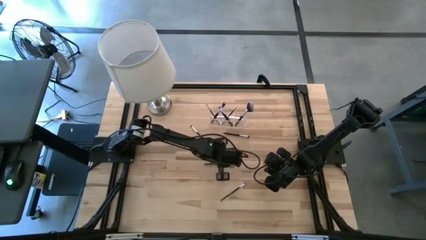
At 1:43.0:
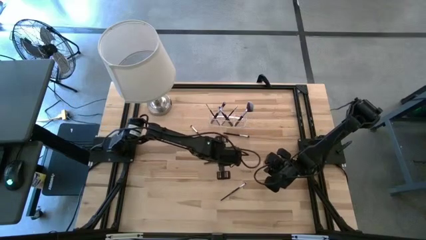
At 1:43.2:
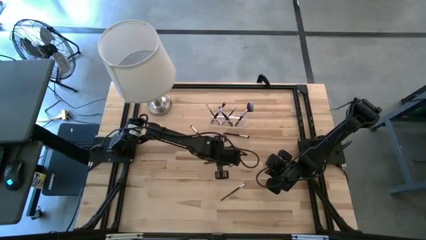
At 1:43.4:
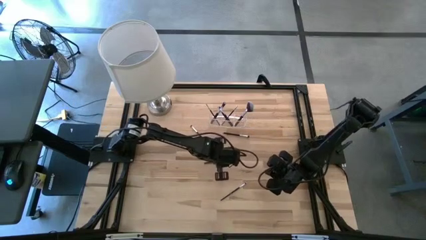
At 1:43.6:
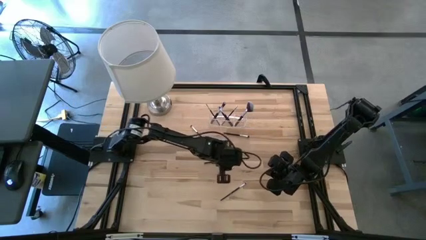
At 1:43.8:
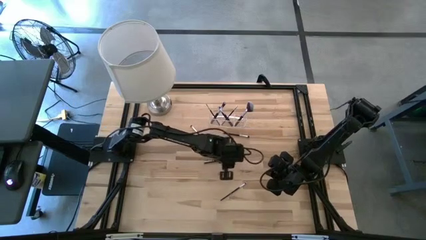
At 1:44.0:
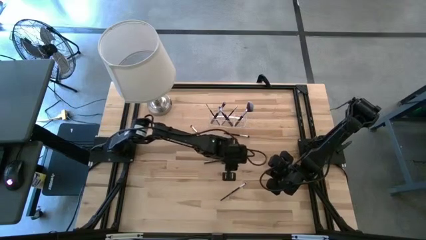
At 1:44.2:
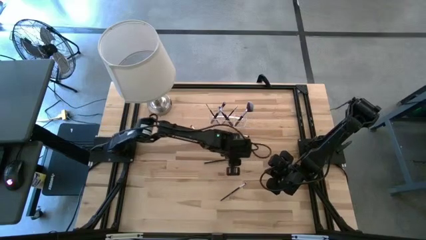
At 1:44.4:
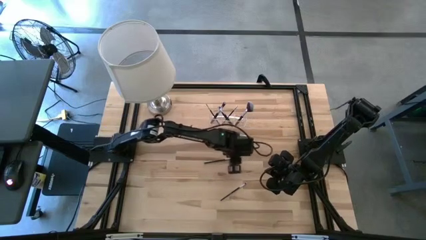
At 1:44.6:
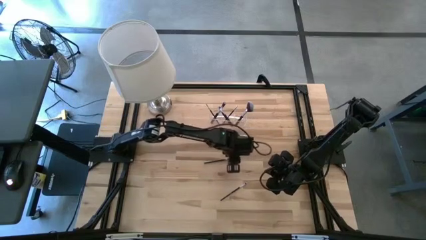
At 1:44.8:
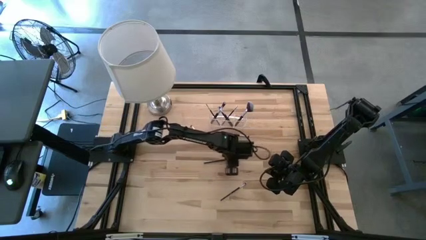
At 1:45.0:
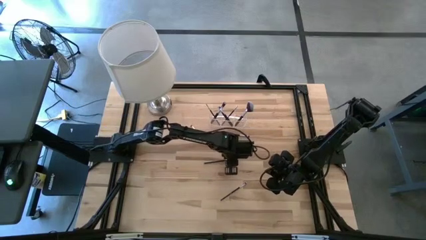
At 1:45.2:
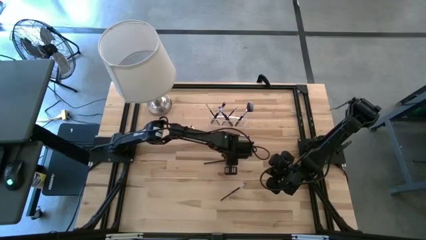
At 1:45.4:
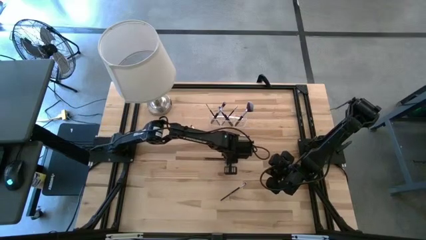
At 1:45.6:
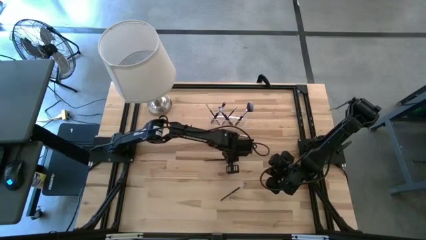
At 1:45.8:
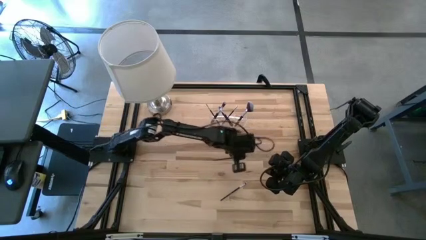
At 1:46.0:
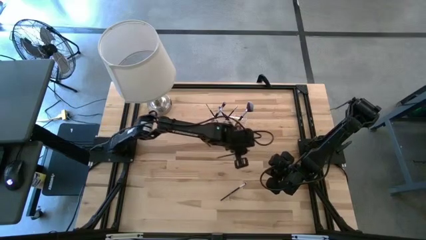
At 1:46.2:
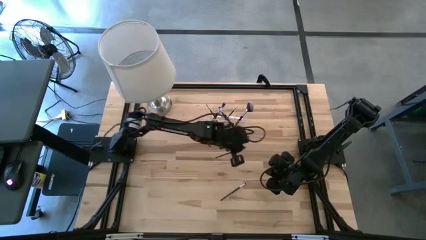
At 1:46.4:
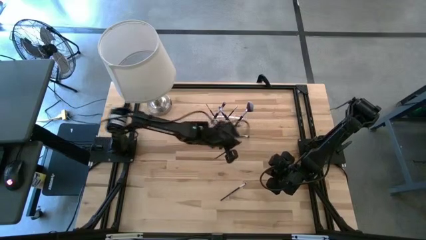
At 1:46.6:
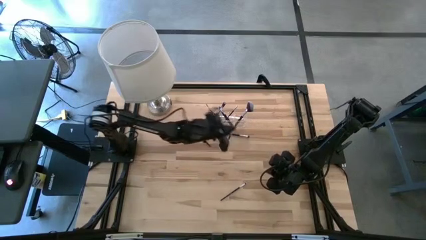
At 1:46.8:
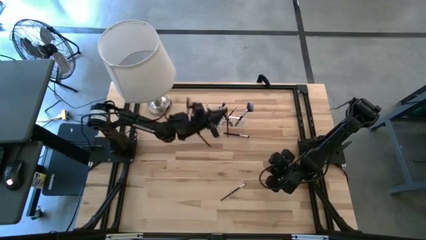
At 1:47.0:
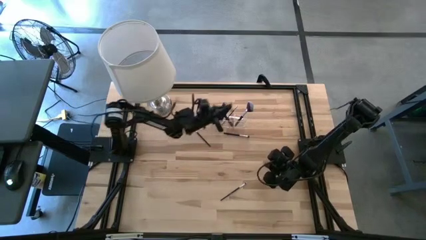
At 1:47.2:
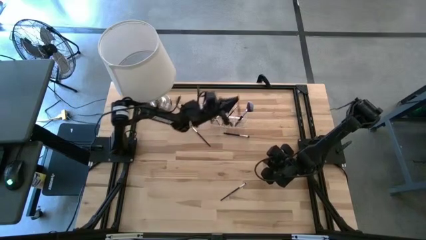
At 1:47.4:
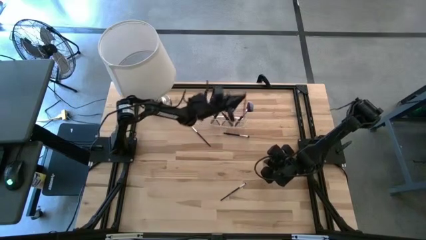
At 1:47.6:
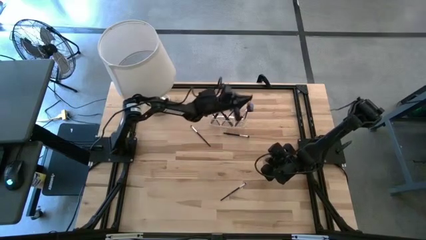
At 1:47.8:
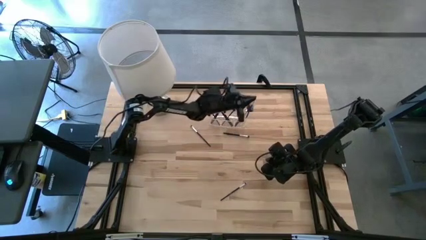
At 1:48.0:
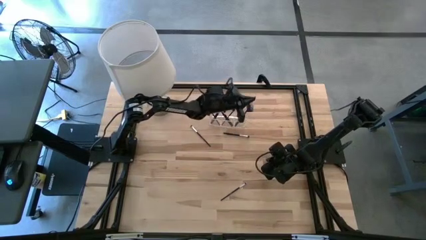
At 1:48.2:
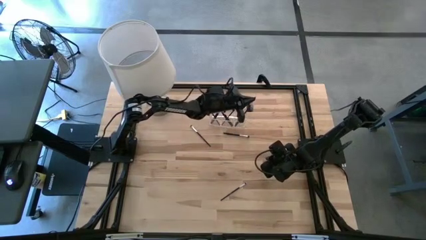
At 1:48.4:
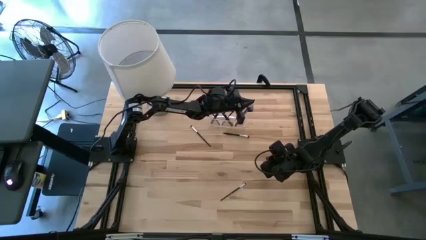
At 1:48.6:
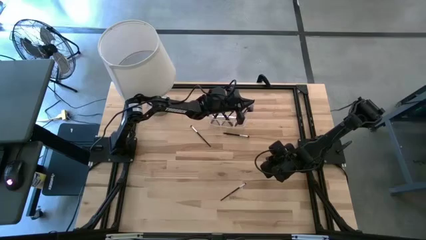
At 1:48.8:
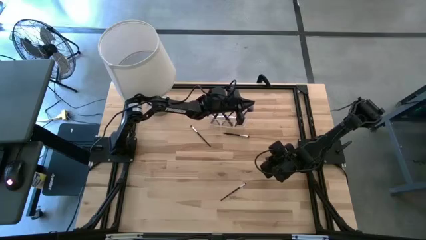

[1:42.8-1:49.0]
Task: Put items in baskets/containers
Put the lash brush into the transparent organizer

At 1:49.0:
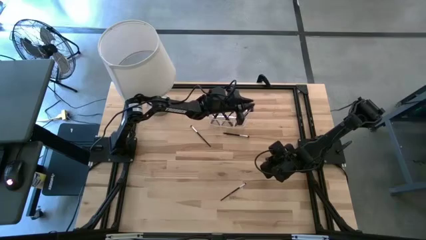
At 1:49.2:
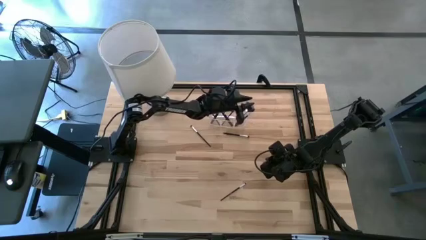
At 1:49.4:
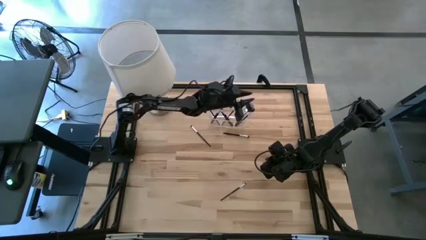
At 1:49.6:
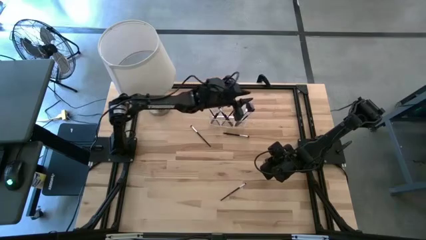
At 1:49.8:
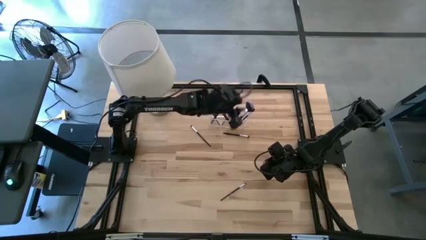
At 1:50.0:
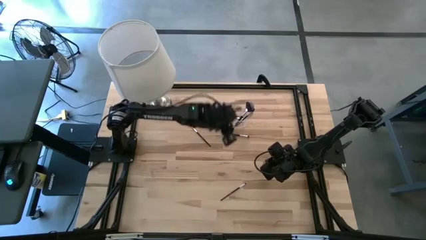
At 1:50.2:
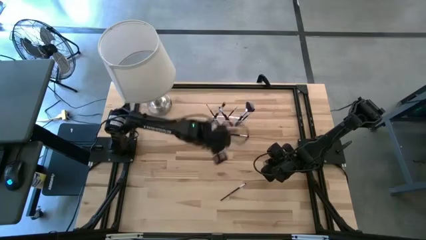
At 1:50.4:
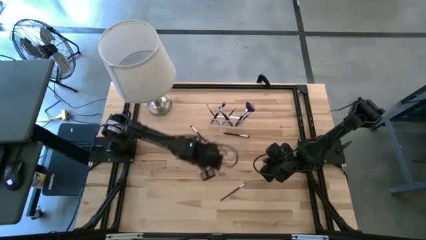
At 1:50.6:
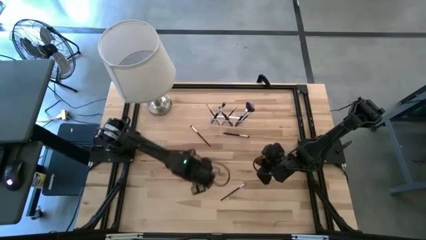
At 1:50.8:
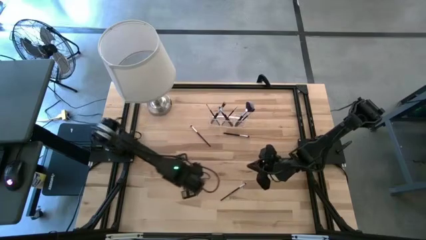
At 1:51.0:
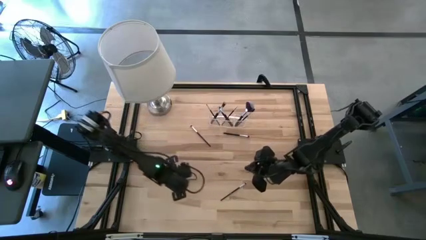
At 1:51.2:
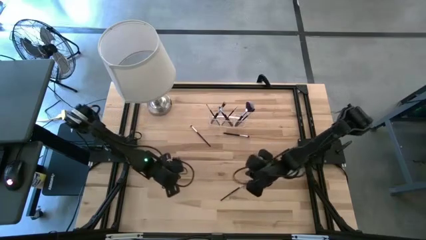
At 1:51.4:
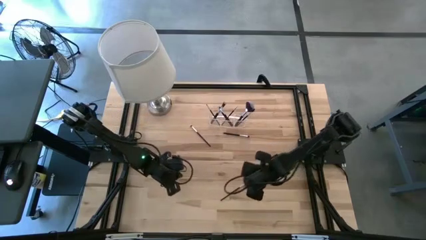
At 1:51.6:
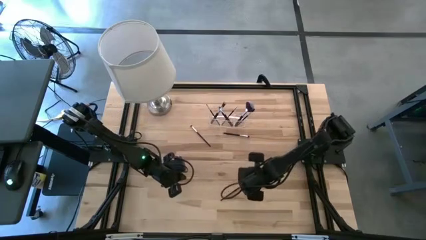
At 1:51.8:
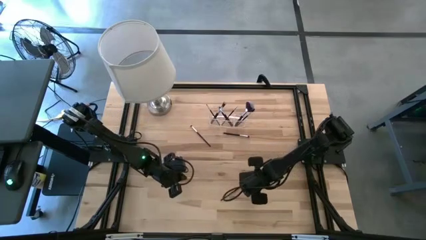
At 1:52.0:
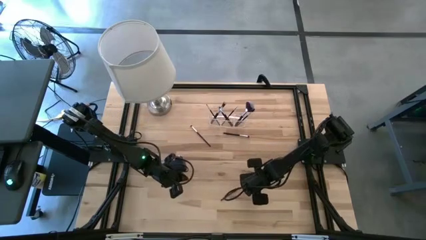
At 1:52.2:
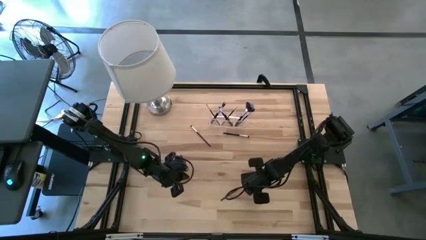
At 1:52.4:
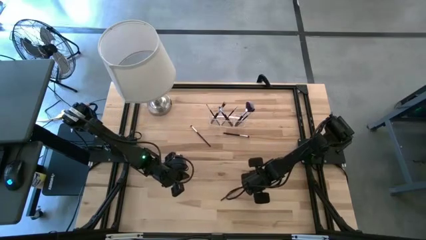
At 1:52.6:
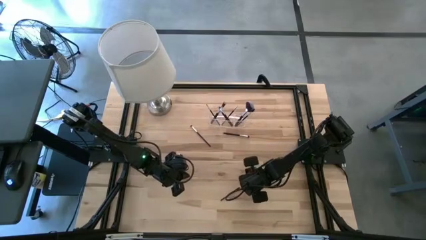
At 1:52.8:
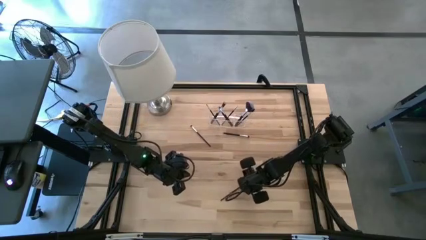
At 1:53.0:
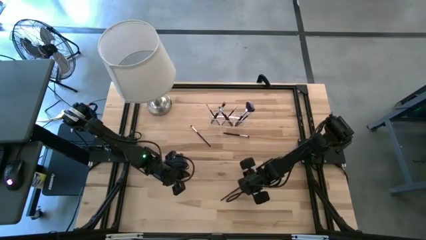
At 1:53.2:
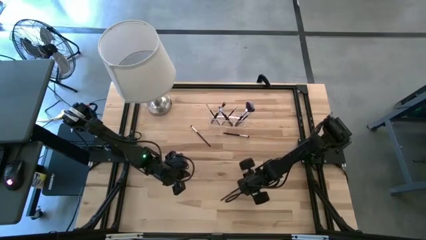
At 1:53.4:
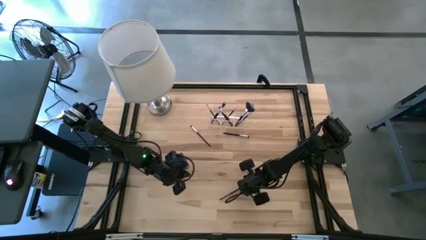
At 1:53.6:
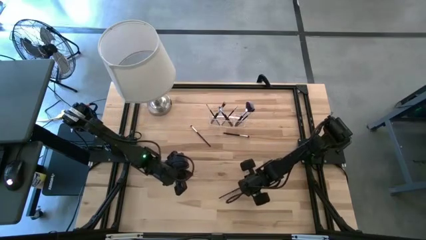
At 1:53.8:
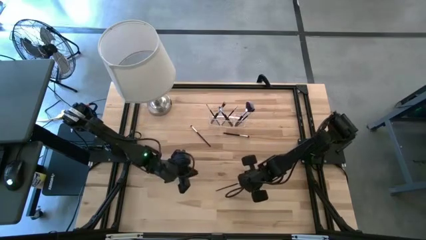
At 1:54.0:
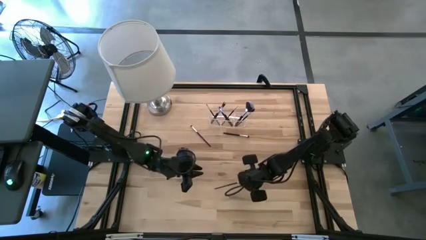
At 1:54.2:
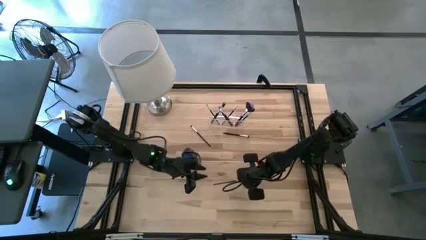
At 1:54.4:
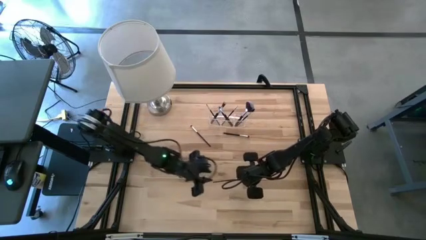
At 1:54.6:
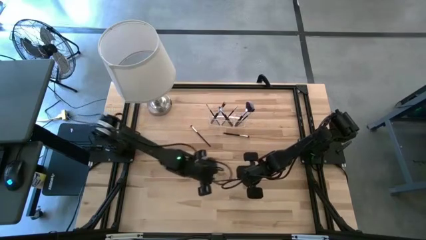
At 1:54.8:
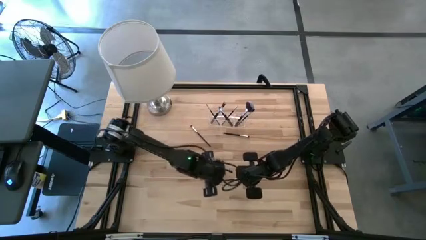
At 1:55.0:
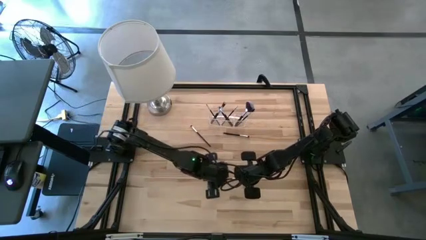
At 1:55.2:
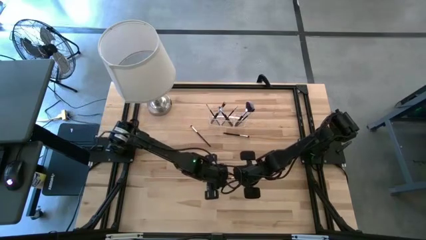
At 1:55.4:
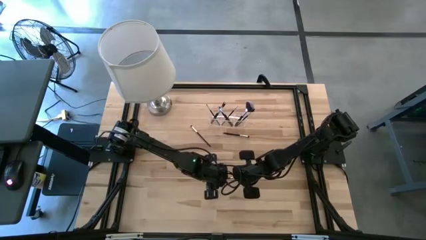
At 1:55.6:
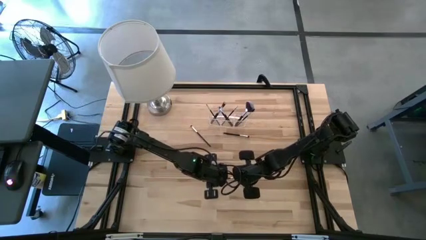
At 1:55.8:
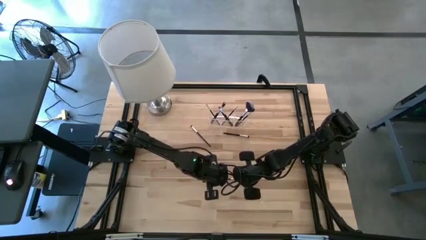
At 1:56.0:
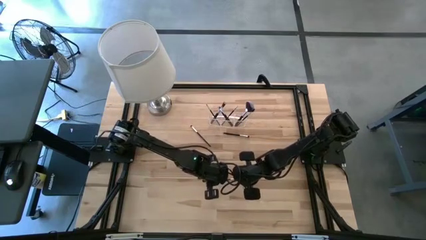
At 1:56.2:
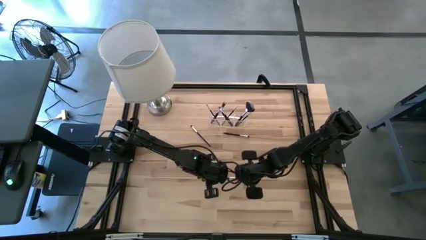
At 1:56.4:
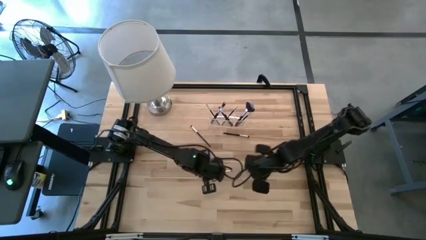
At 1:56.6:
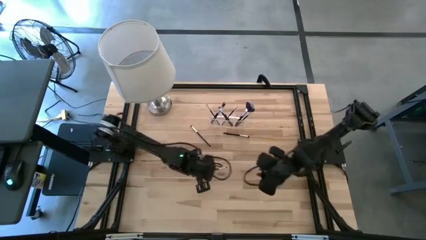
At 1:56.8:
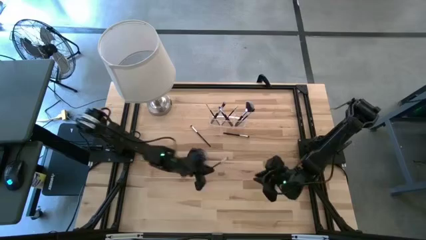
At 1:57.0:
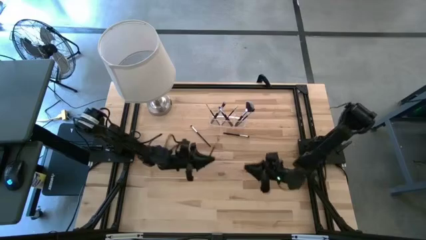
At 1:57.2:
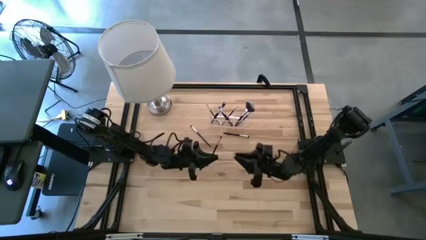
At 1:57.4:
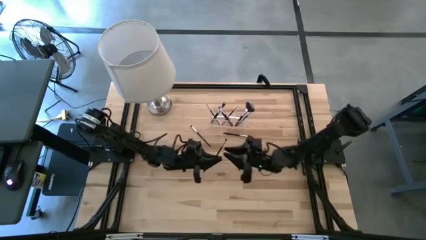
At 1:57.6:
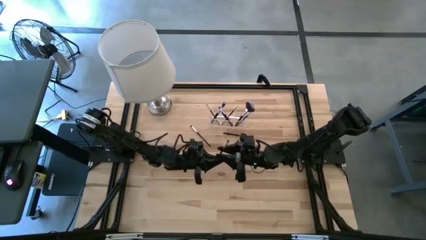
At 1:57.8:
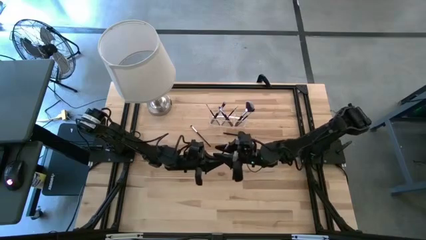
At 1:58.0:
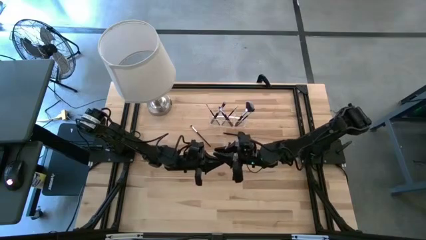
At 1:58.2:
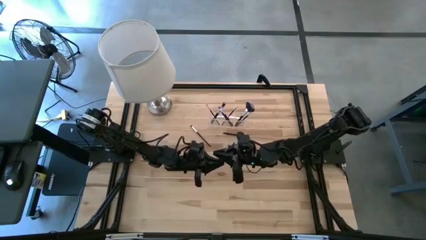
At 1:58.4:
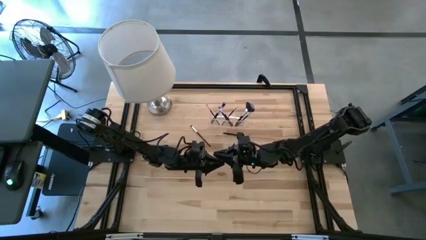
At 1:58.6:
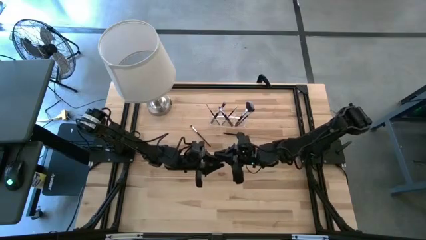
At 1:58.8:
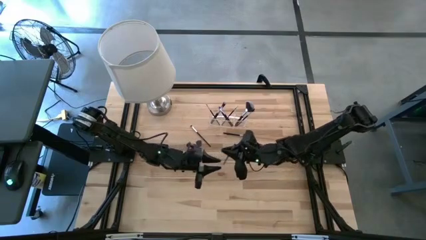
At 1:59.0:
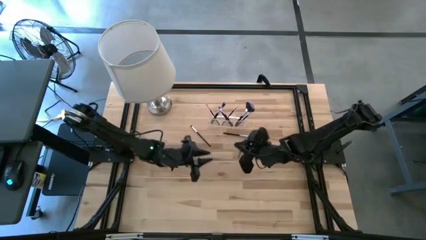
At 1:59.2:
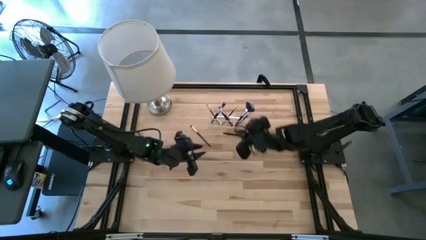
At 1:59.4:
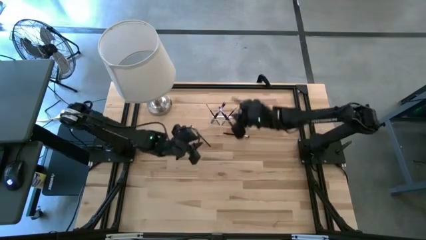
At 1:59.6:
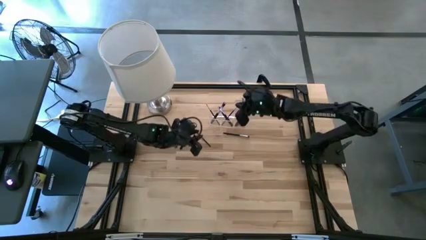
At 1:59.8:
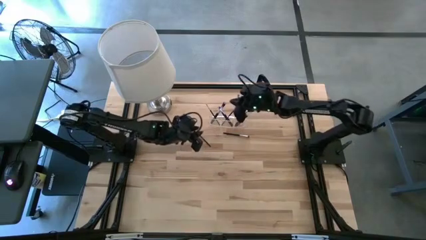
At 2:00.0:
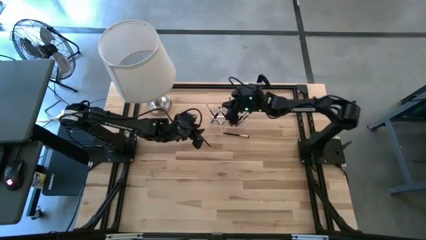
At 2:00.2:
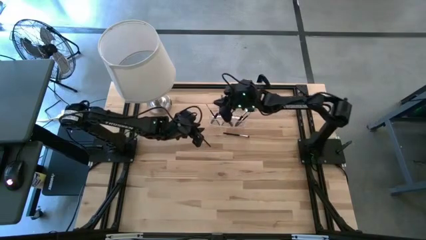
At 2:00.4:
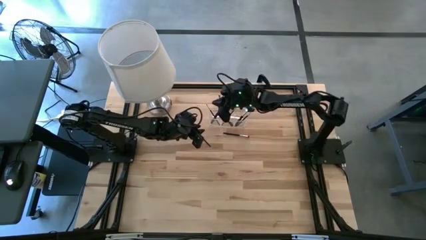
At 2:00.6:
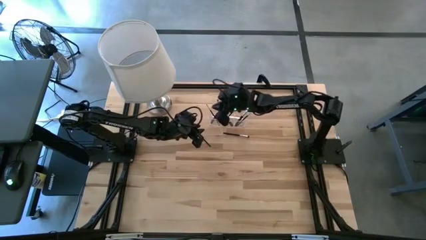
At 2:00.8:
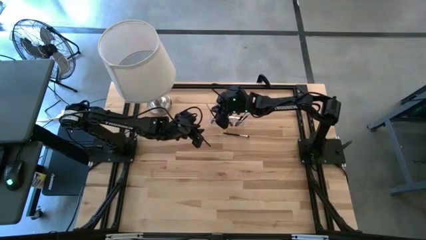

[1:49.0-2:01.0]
Put the eyeshadow brush into the transparent organizer
